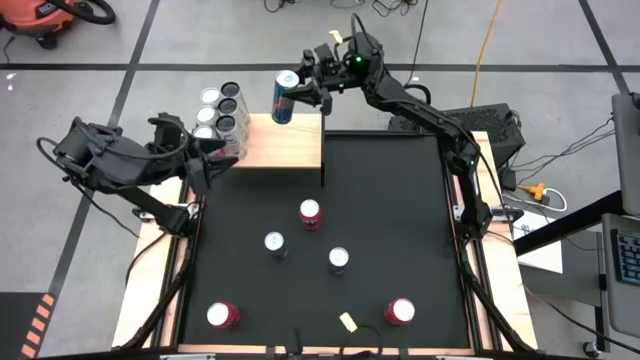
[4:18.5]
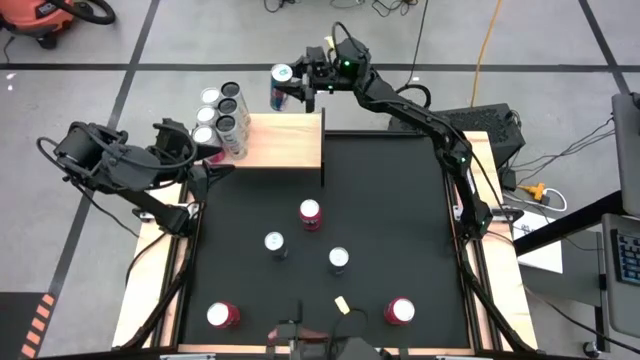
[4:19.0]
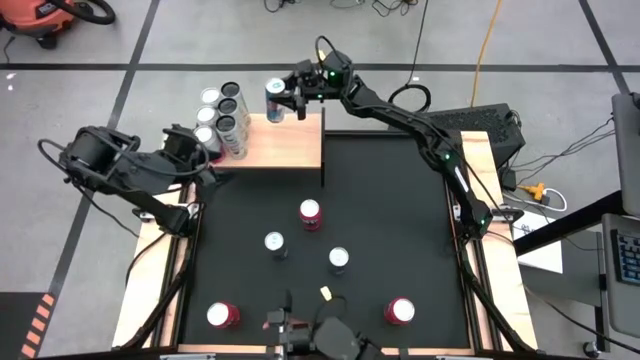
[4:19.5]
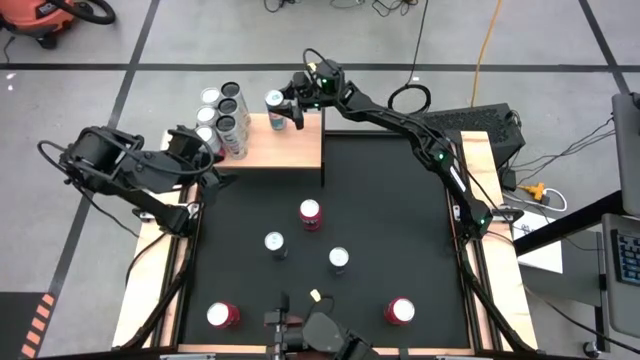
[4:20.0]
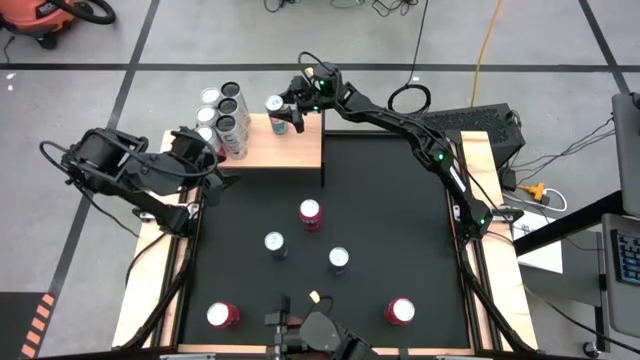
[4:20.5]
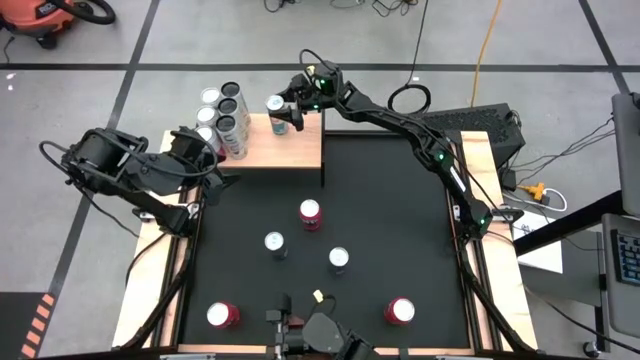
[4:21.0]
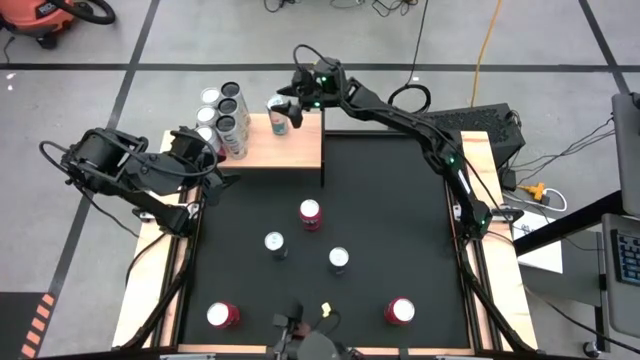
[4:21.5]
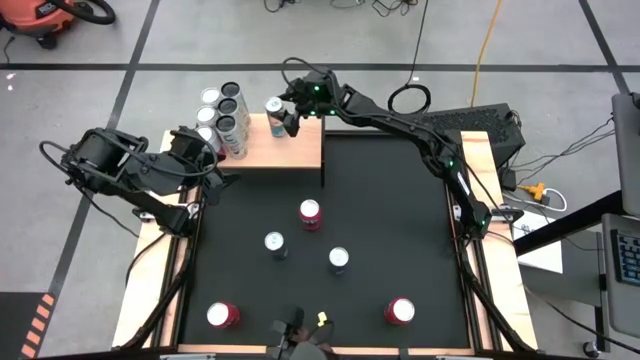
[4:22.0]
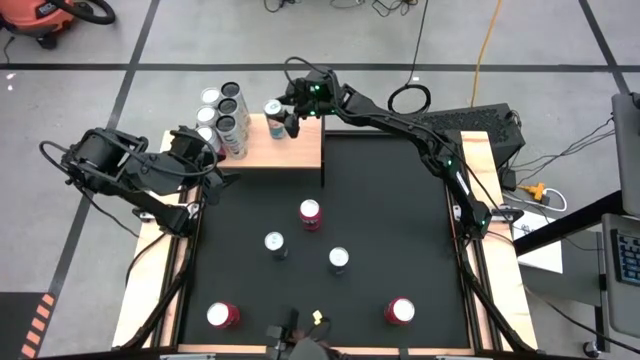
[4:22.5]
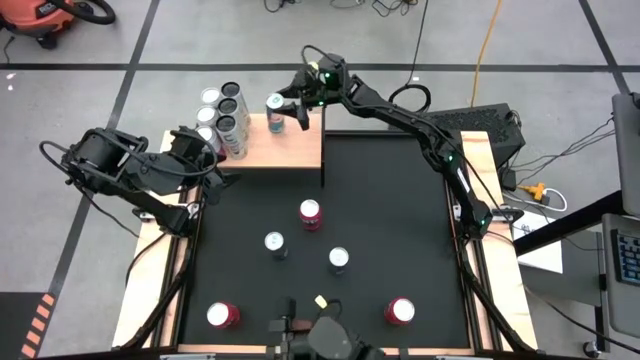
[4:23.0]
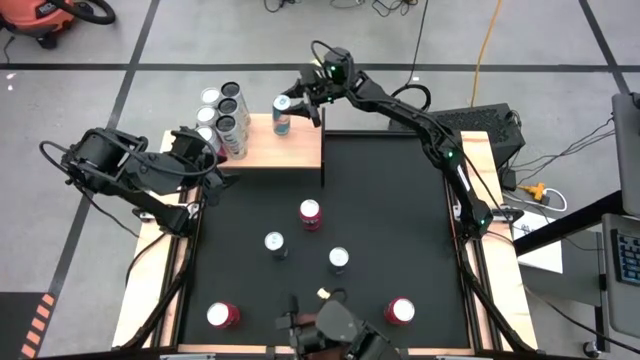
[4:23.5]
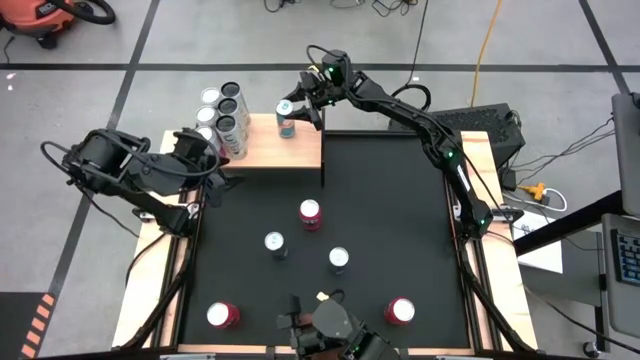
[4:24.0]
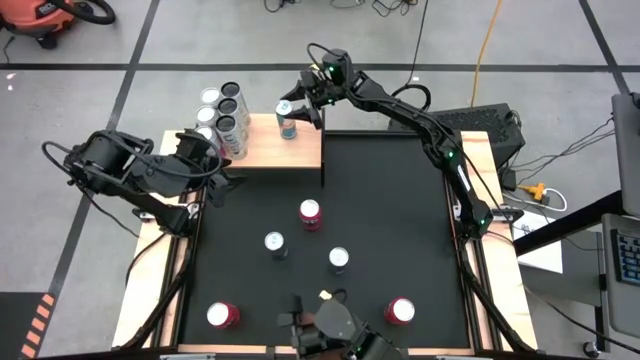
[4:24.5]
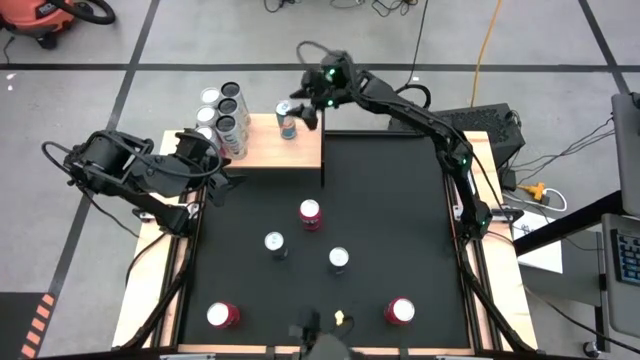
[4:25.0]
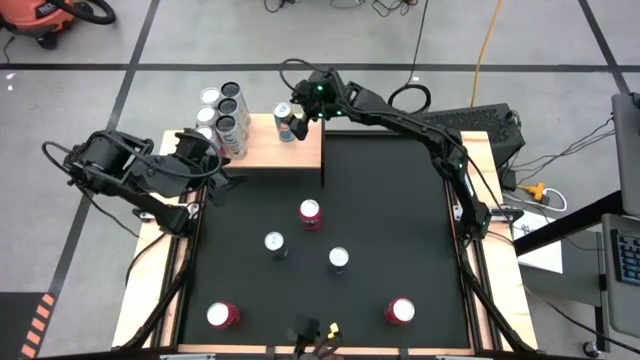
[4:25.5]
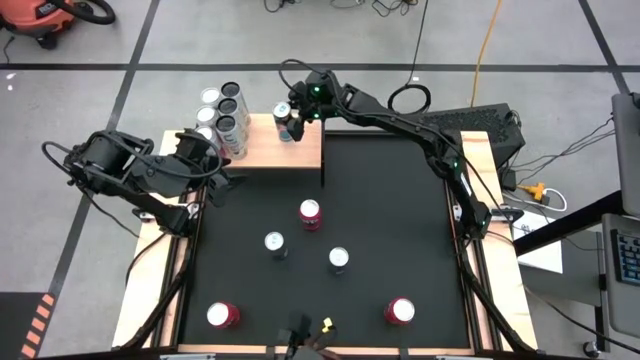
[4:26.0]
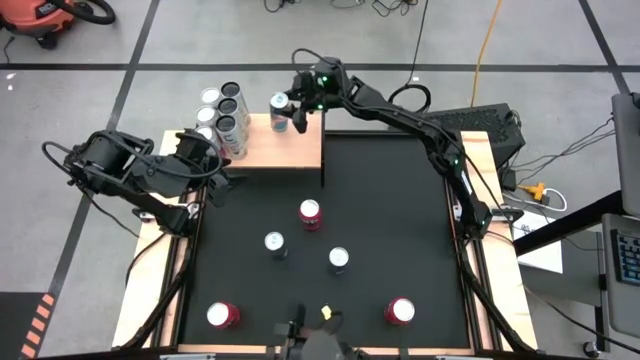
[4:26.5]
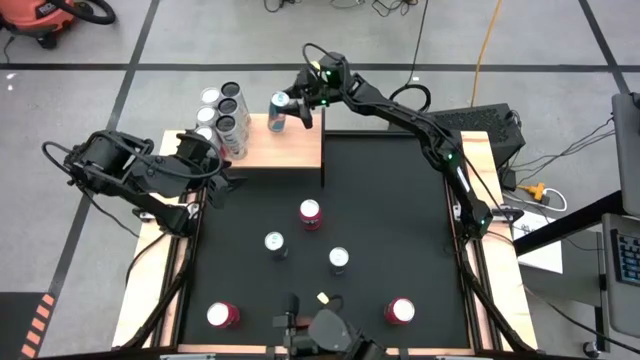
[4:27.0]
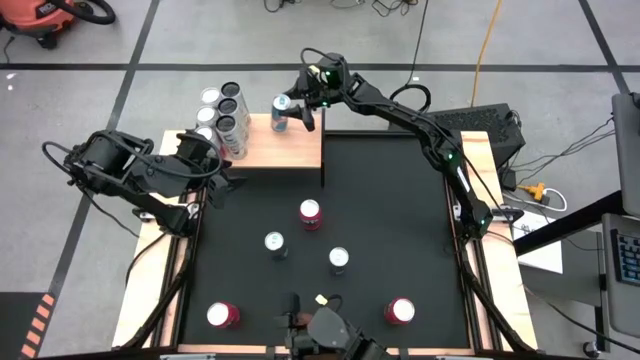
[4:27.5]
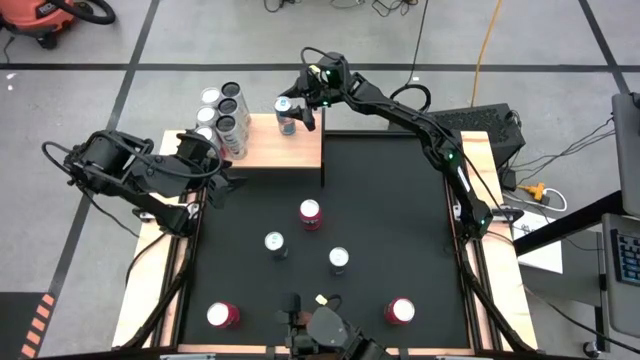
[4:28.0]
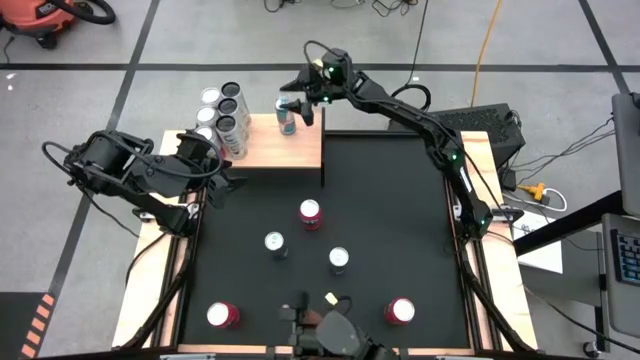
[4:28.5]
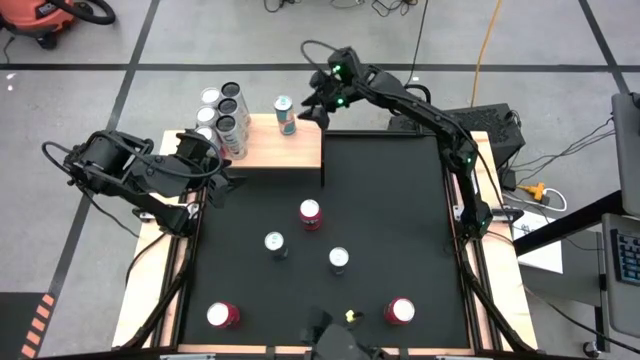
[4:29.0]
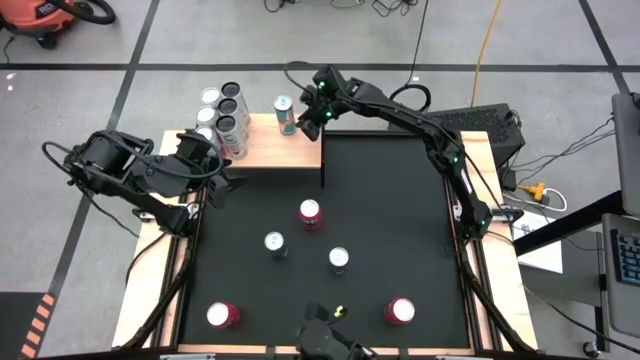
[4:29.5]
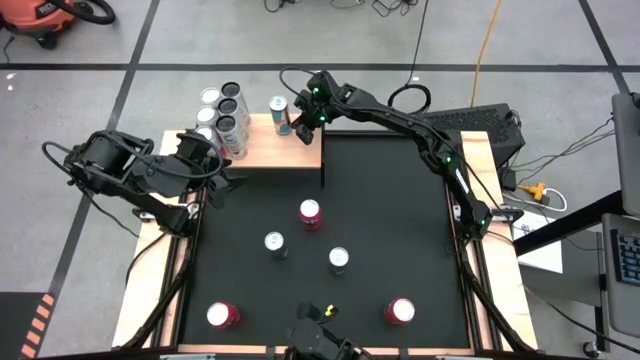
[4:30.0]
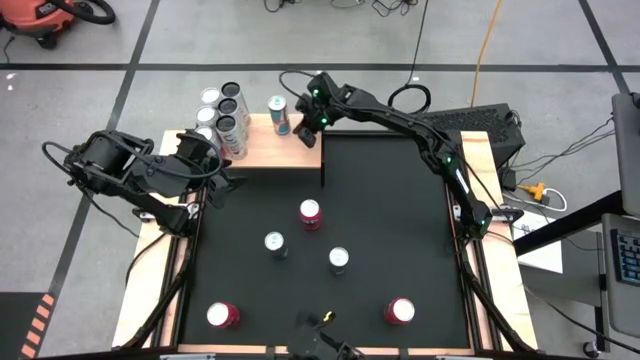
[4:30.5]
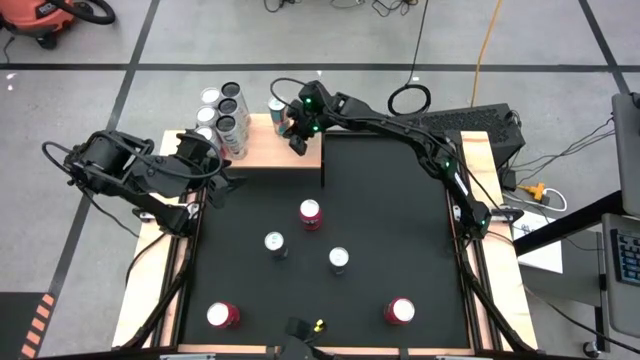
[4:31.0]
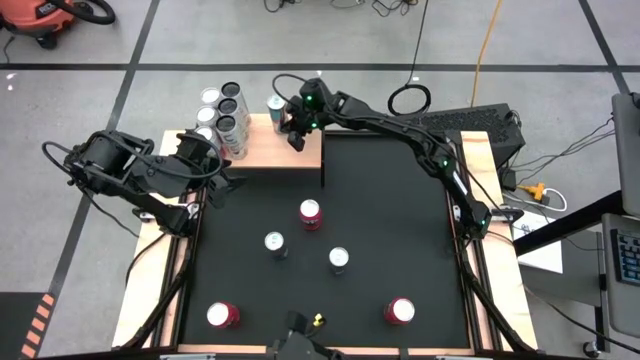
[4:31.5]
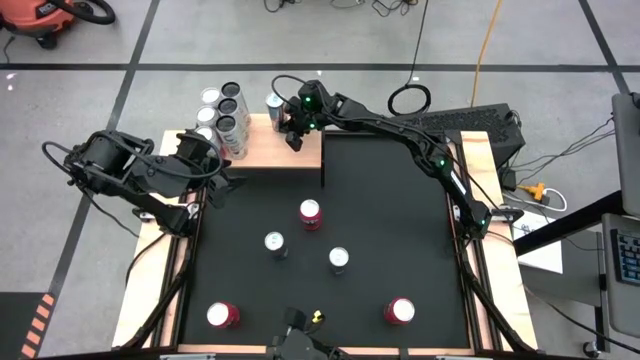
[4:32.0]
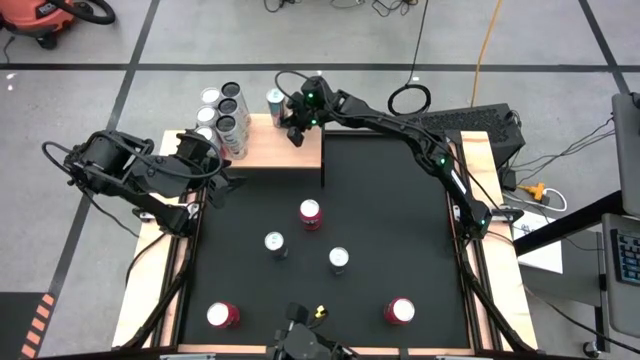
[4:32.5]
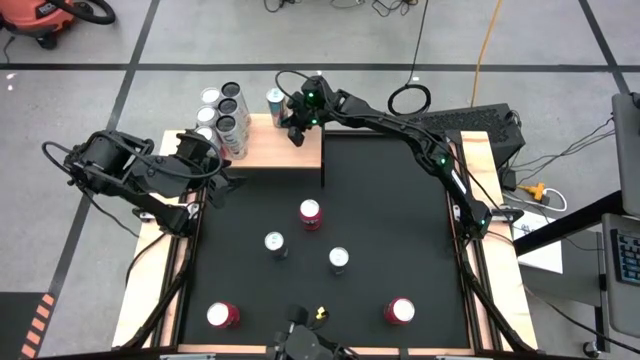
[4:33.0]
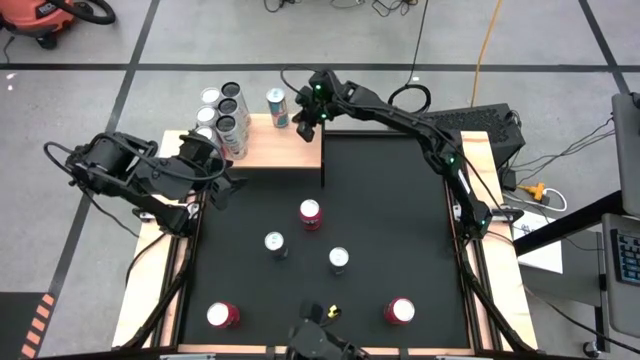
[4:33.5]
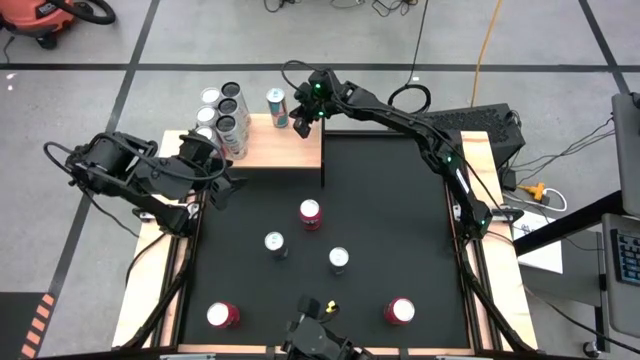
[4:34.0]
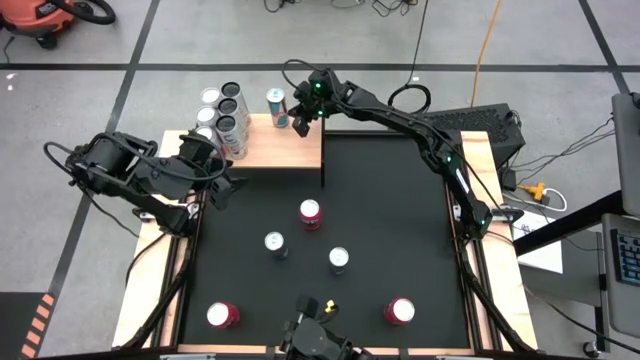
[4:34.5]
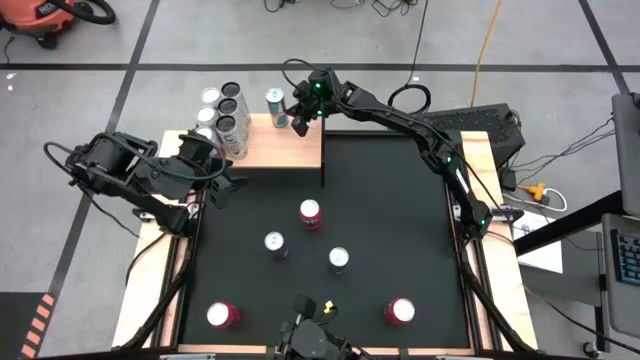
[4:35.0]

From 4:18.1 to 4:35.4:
Task: Place canned beverage on shelf
Put the top right blue soda can on the shelf

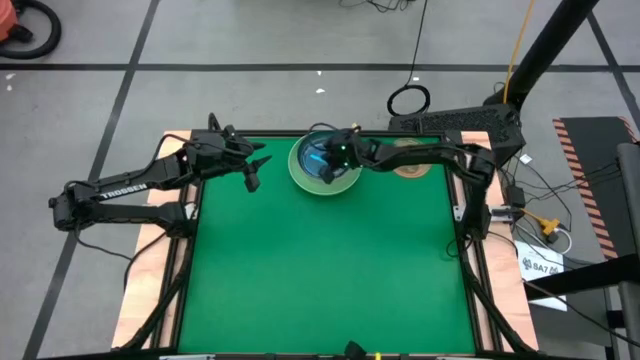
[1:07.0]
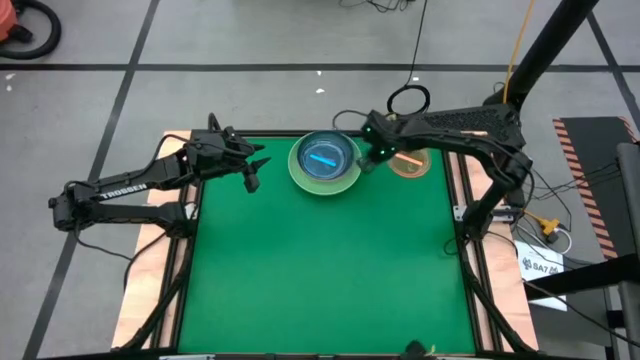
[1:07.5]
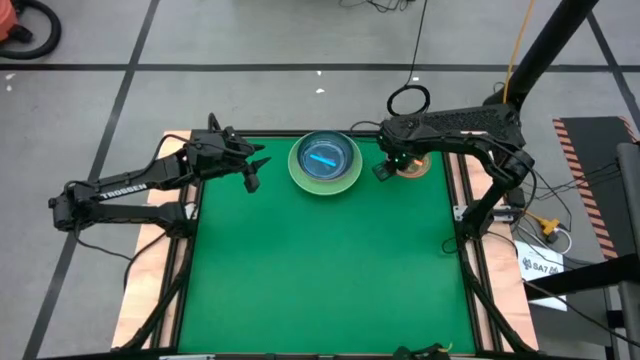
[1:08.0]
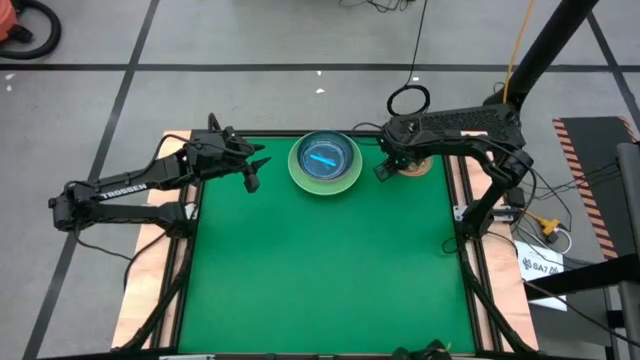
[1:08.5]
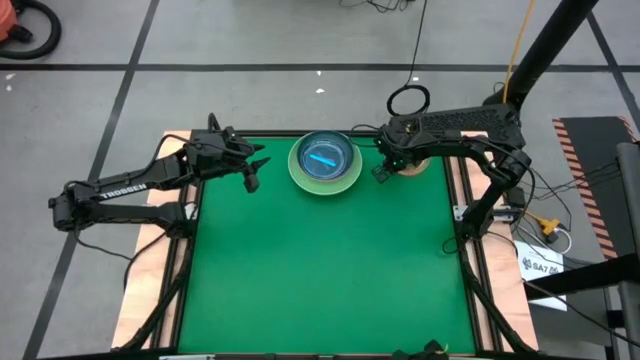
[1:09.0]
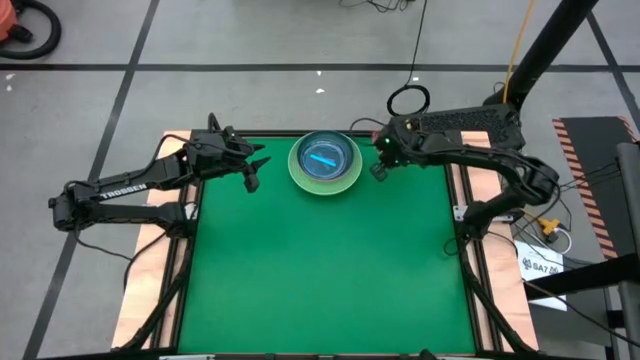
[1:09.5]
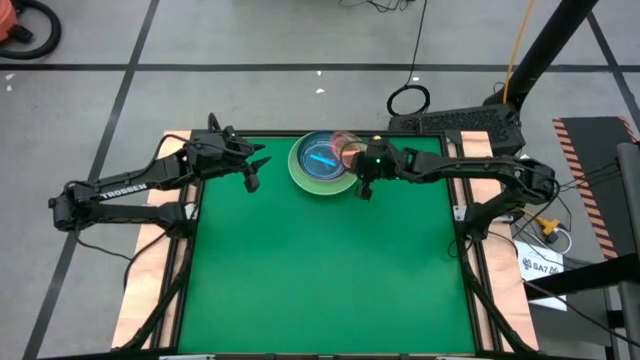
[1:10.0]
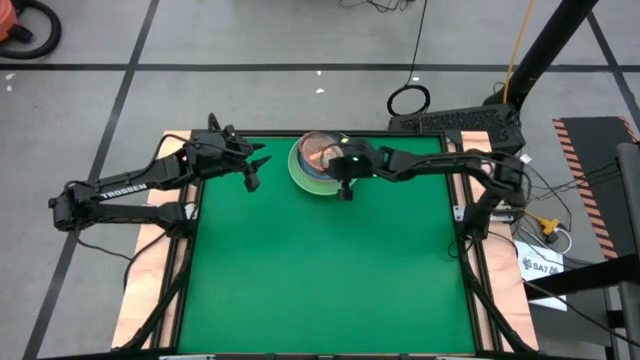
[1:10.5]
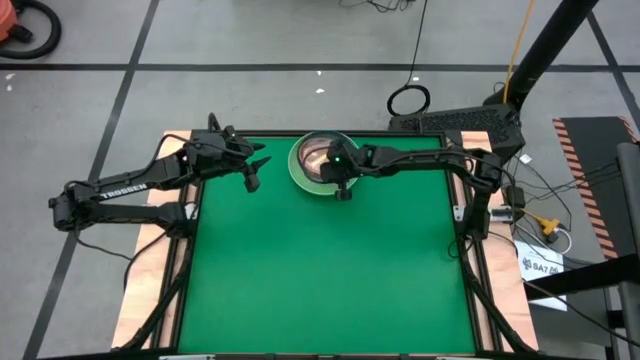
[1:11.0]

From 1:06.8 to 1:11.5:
Task: Stack plastic plates
Stack the orange plate on top of the blue plate

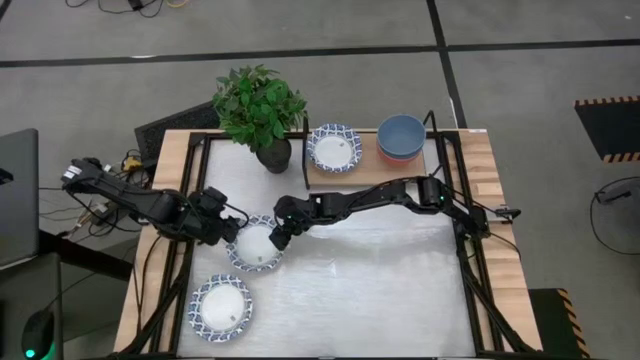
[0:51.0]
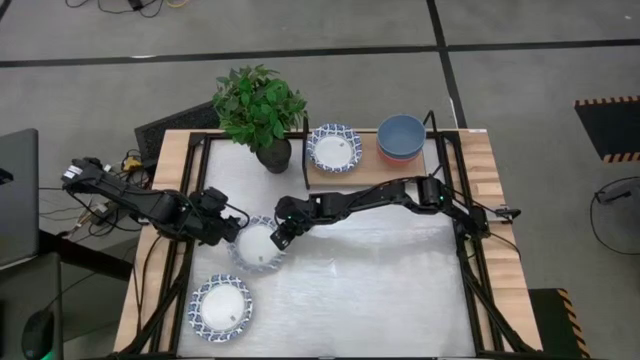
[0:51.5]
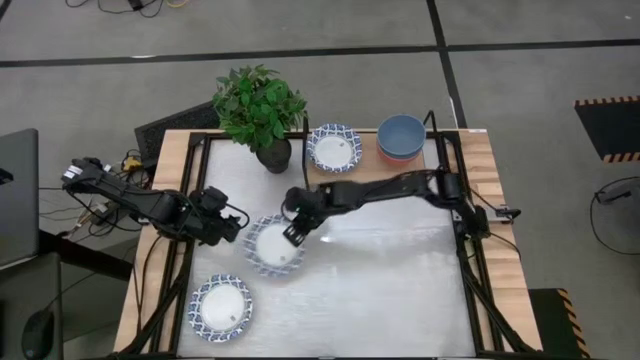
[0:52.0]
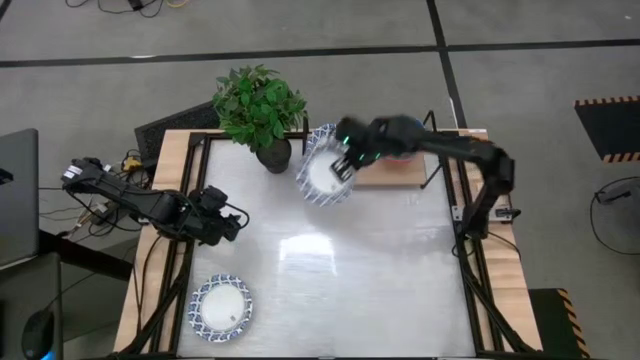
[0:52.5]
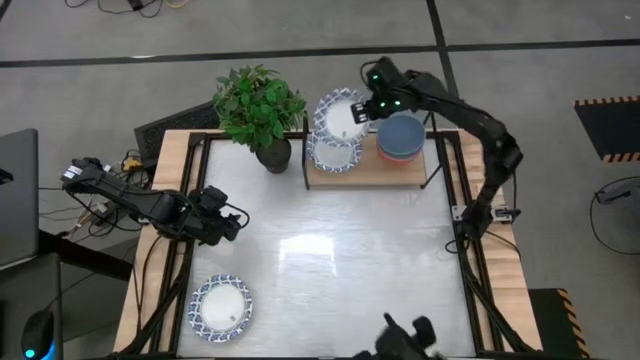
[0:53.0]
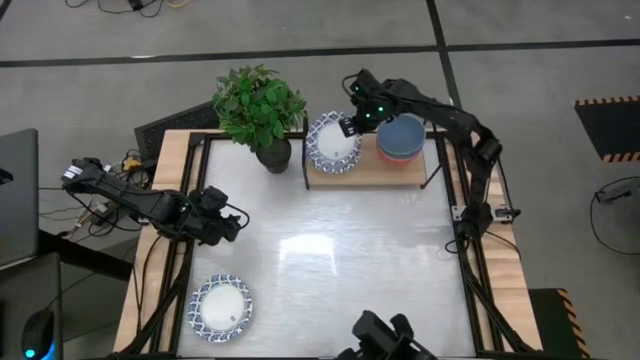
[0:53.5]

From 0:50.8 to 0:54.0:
Task: Place and stack bowls onto a shelf
Stack the white bowl on top of the white bowl on the shelf
